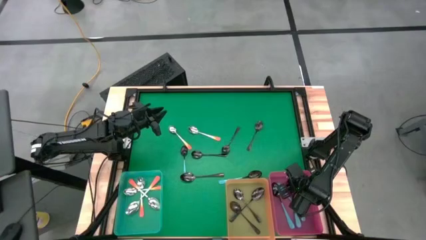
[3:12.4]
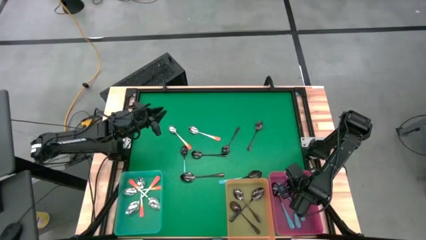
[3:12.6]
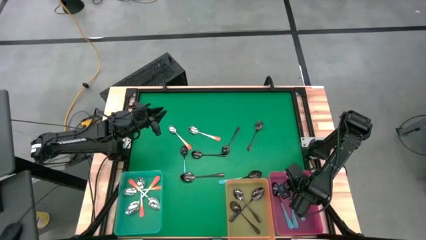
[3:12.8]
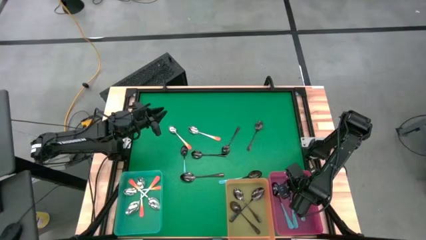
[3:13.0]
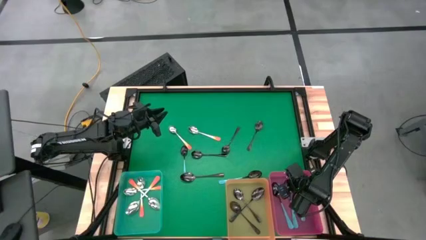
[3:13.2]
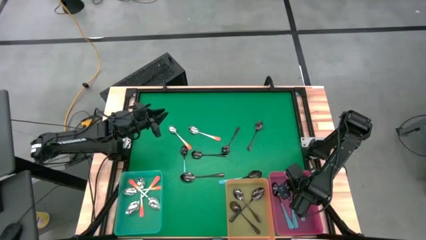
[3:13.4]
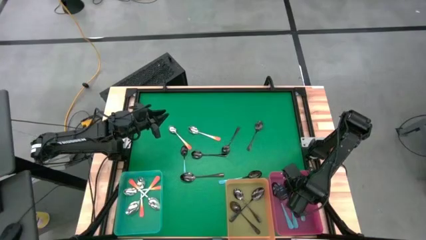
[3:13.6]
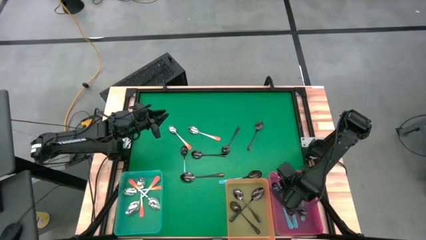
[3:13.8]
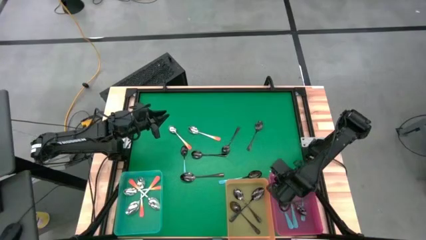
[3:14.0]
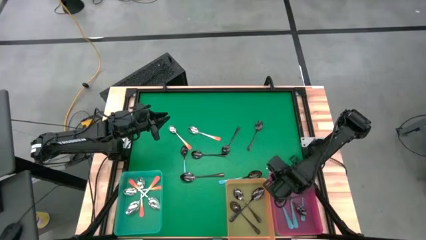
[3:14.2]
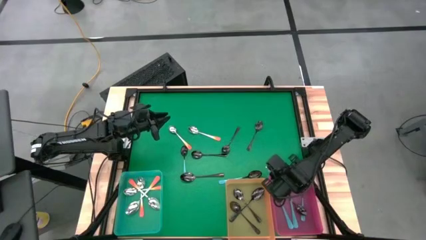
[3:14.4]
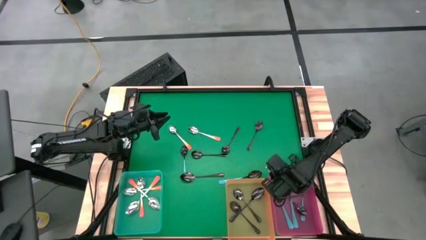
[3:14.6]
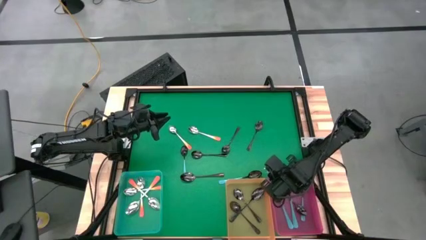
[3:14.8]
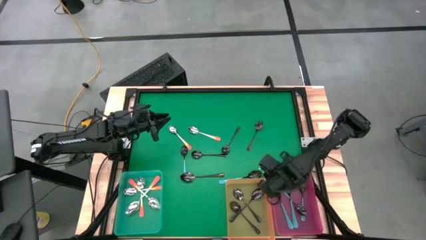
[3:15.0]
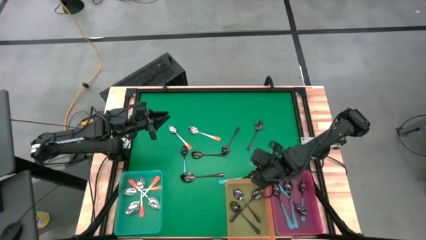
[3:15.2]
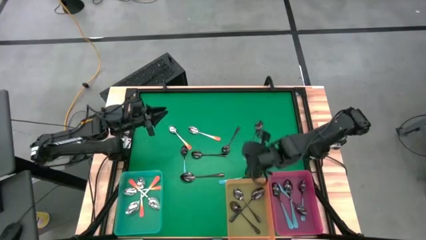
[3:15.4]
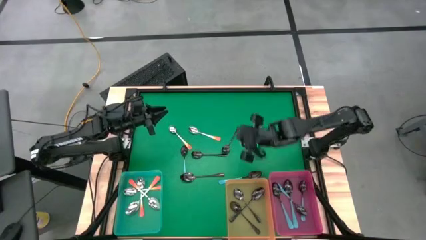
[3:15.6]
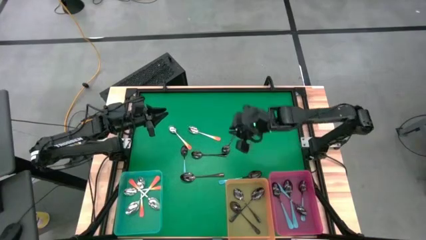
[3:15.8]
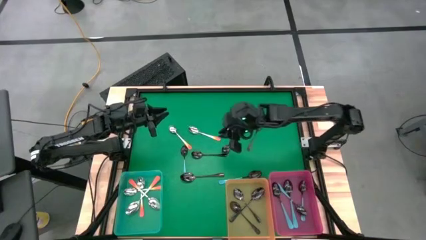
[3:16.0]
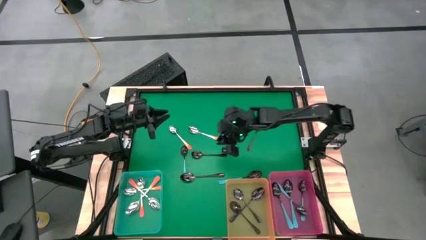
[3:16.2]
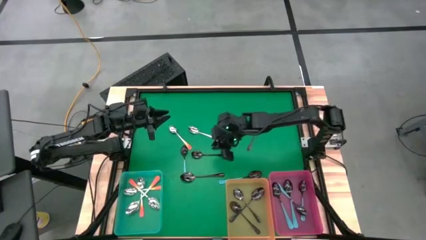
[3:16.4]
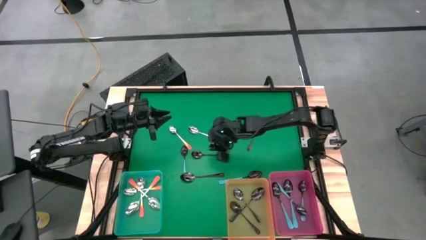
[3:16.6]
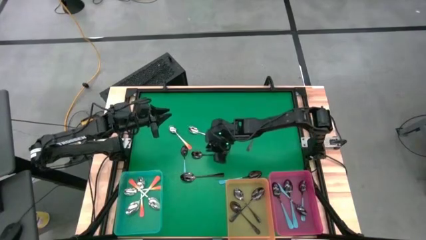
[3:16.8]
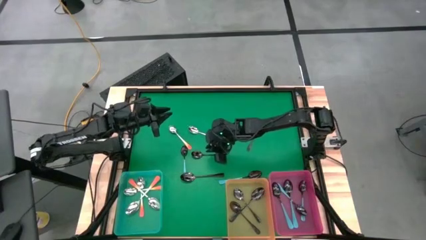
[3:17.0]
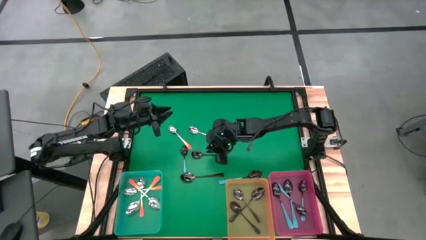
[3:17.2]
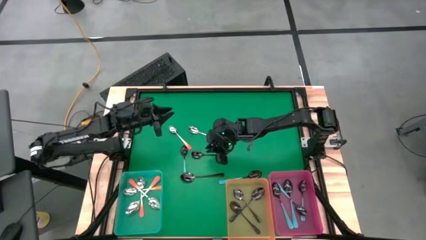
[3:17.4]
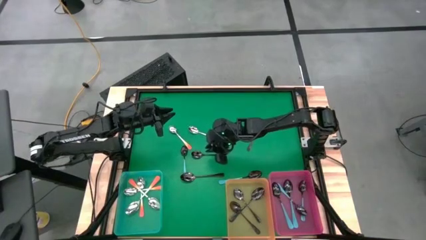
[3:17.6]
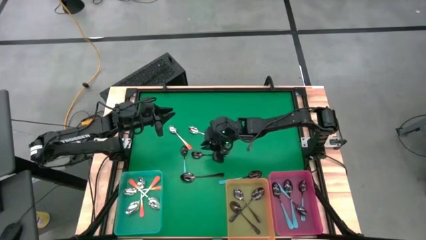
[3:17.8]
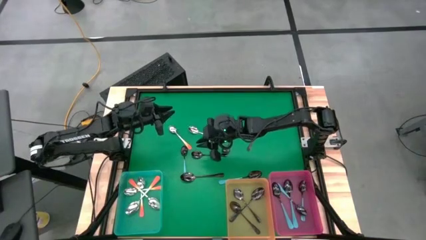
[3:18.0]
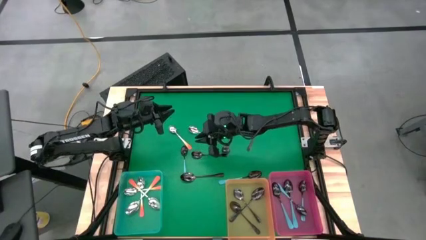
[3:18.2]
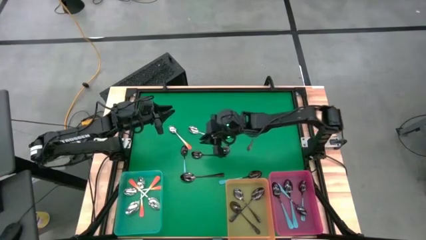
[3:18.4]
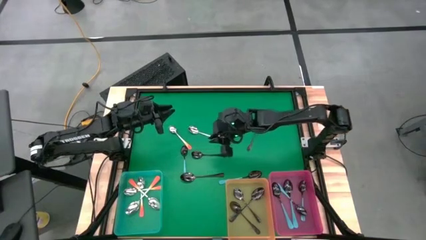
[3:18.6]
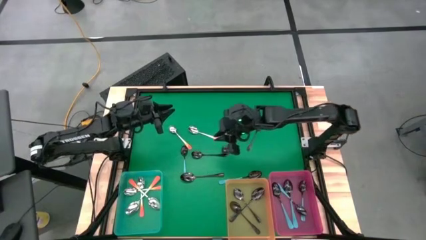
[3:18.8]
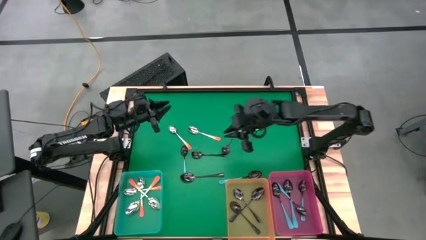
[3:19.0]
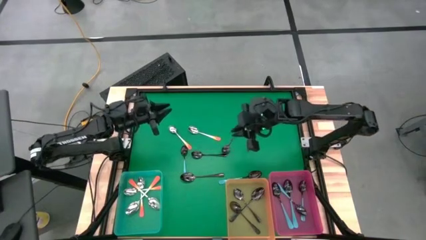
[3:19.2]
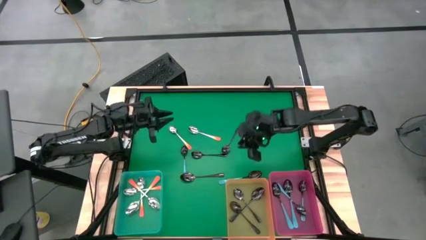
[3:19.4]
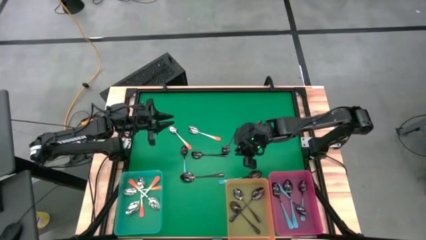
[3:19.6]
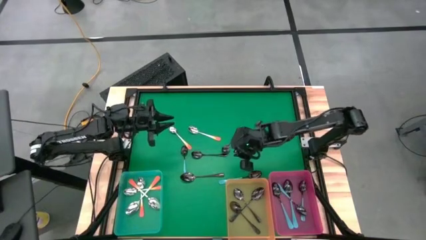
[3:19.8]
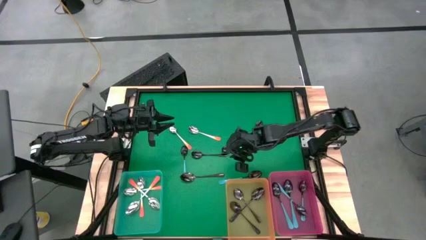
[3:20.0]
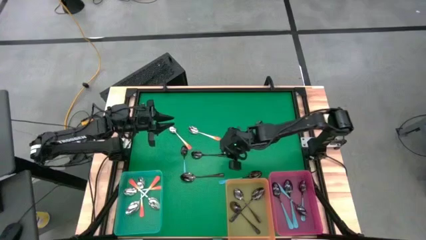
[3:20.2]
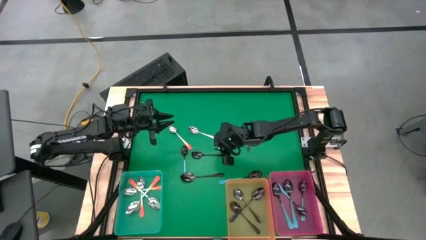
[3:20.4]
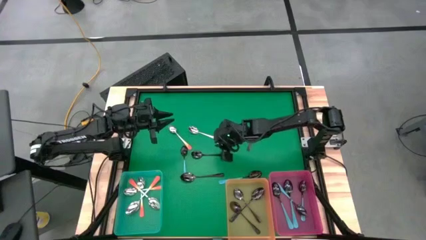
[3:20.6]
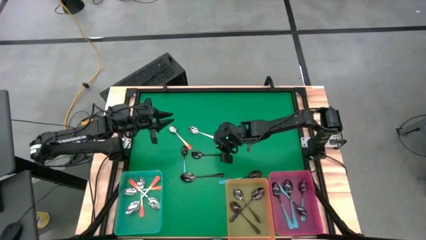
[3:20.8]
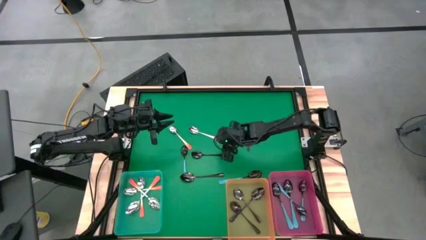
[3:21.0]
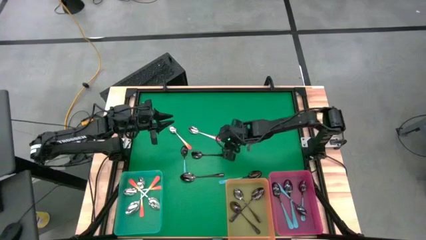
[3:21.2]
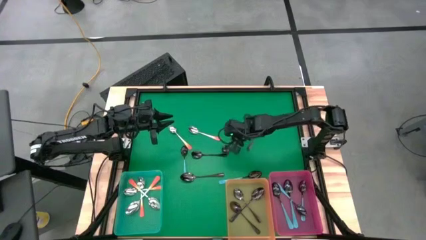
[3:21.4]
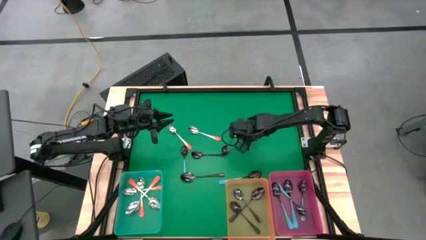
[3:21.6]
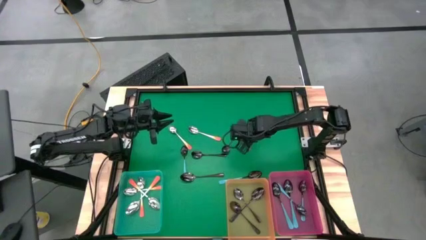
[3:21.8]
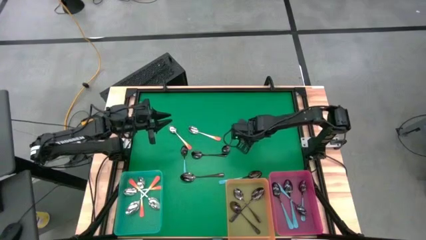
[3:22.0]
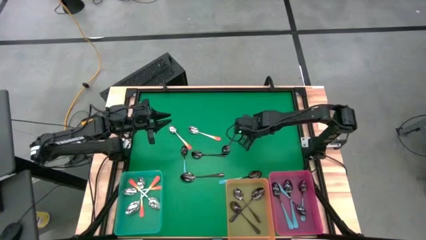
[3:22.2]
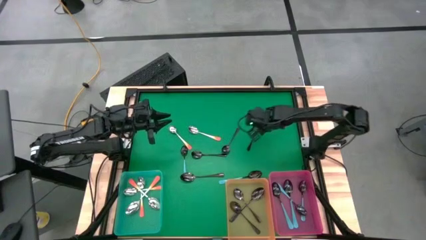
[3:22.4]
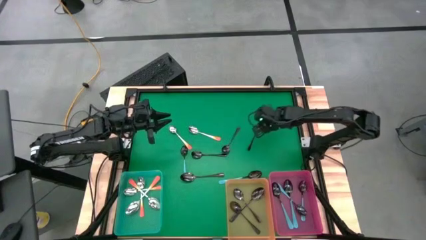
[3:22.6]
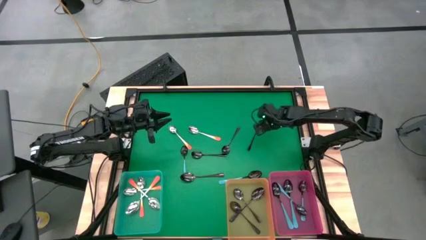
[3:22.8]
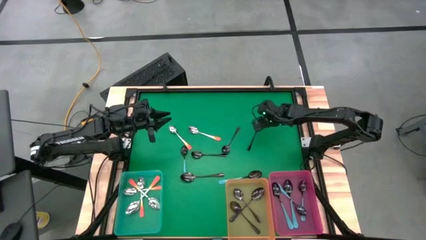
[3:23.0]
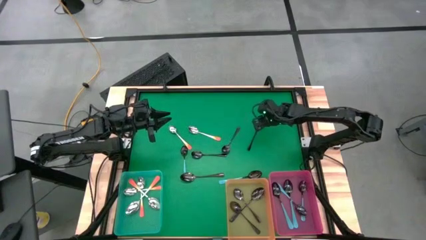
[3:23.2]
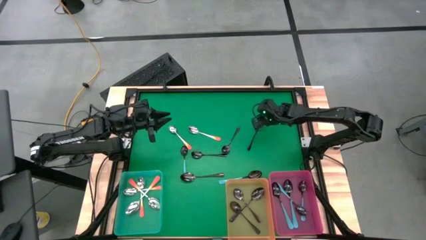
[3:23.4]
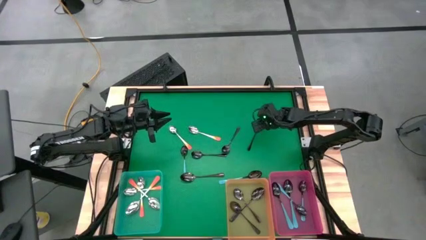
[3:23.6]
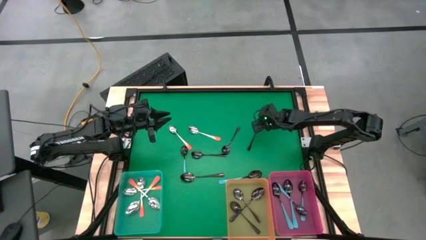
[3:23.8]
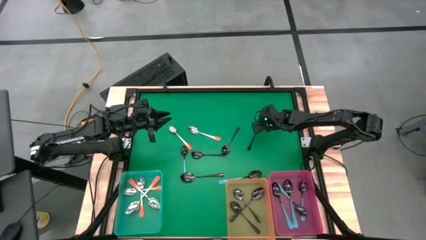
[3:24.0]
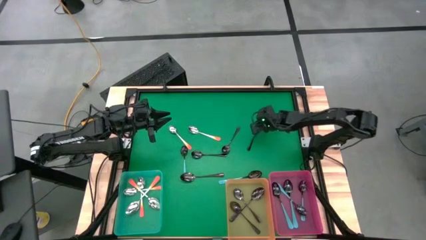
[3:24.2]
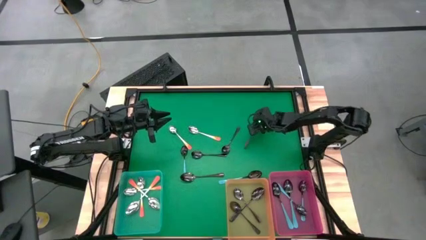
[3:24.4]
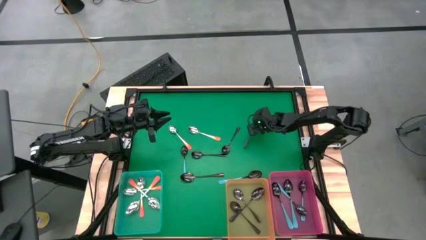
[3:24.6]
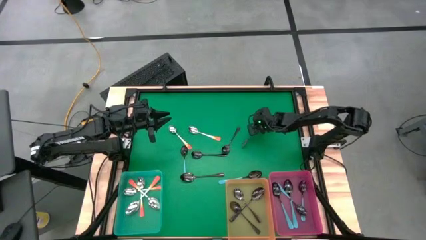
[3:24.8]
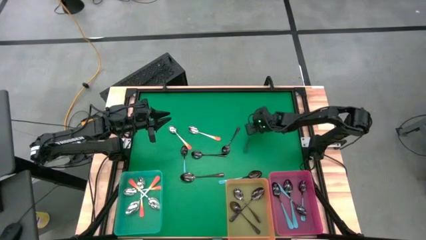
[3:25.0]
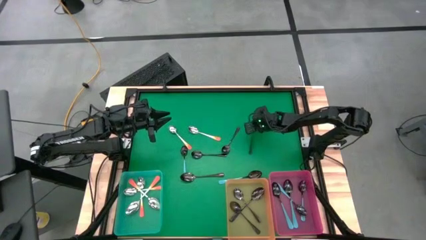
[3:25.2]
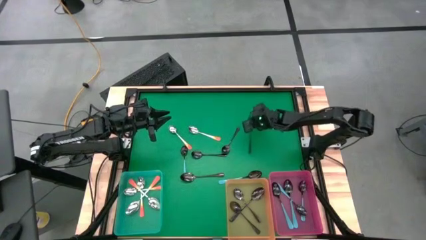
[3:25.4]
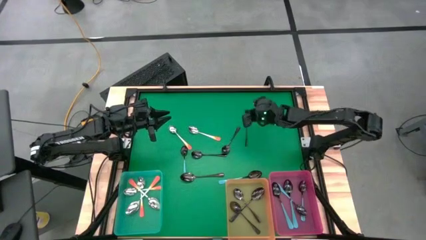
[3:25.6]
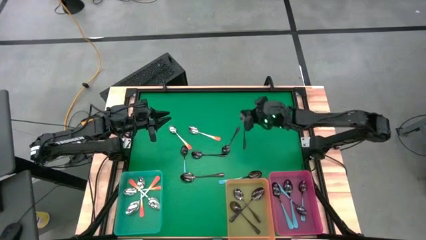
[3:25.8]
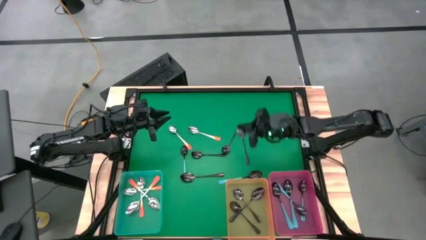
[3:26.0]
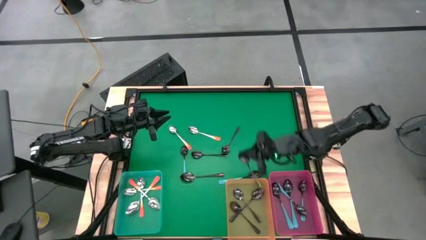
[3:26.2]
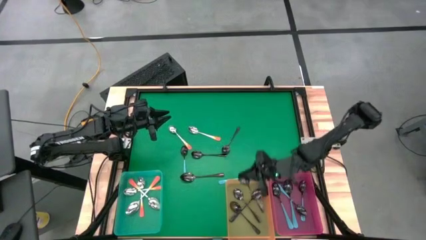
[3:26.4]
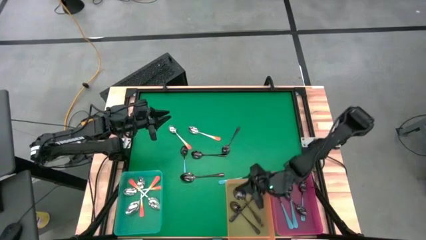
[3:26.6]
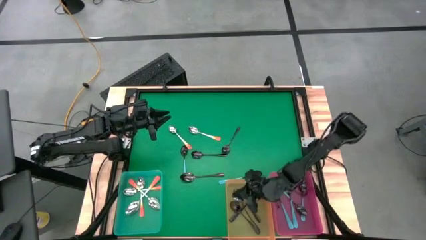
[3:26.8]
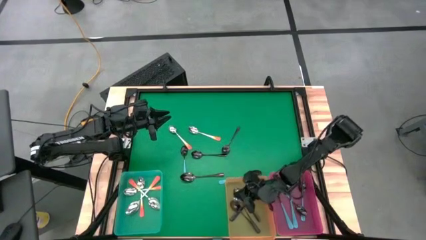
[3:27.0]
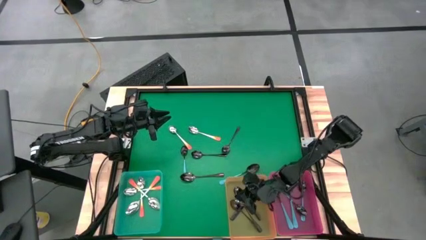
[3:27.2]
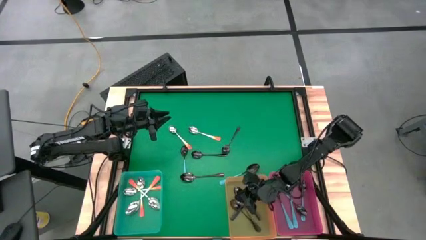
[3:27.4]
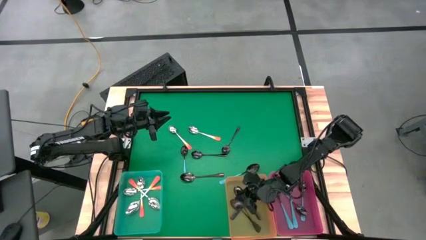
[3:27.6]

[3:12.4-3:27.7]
Task: Sort silverware by color (type)
Put the black spoon into the orange bin
